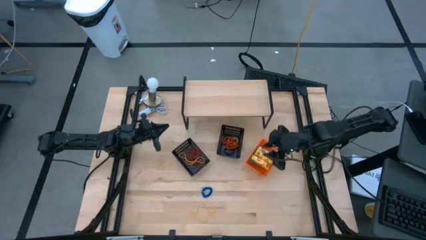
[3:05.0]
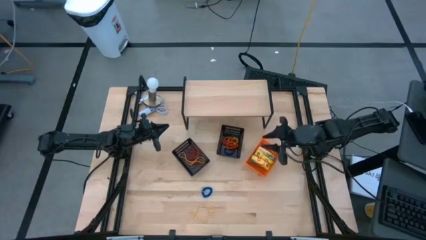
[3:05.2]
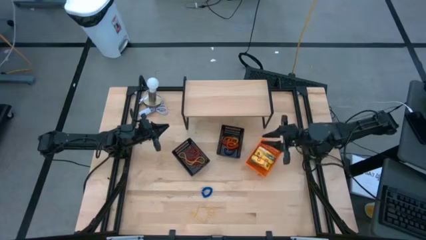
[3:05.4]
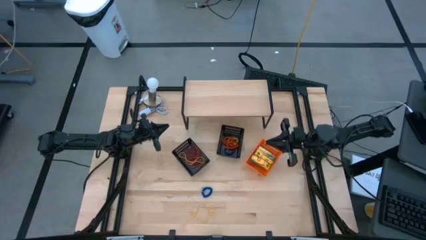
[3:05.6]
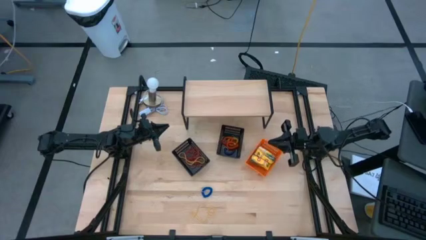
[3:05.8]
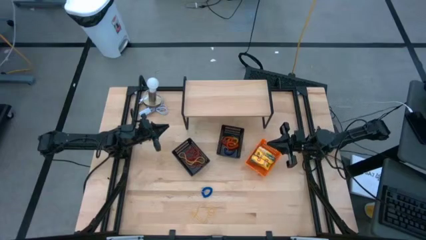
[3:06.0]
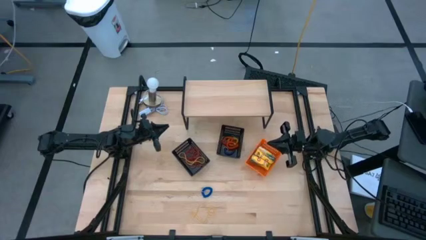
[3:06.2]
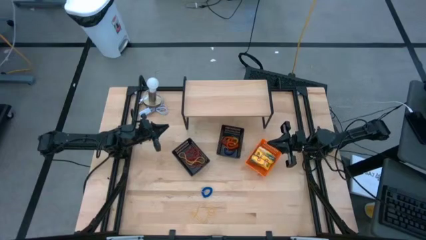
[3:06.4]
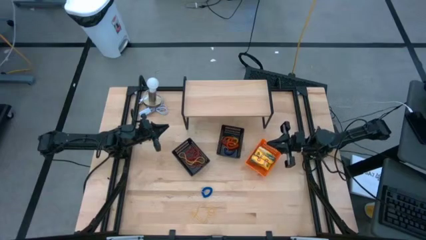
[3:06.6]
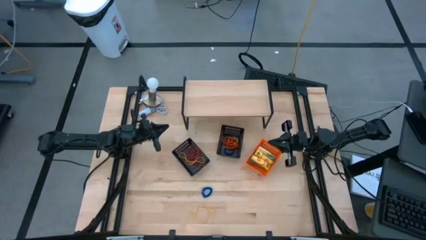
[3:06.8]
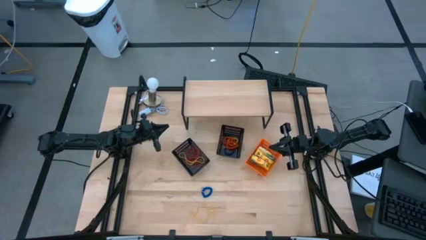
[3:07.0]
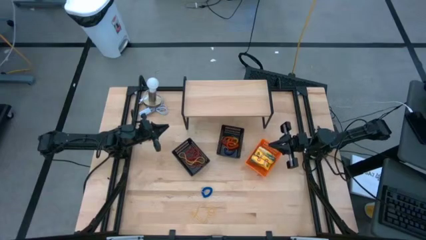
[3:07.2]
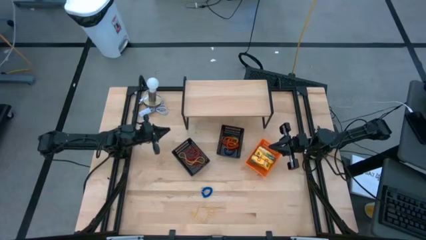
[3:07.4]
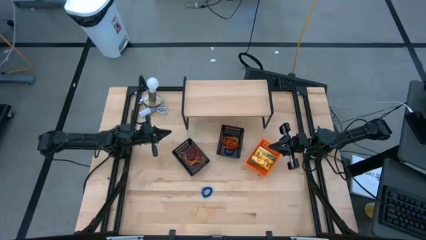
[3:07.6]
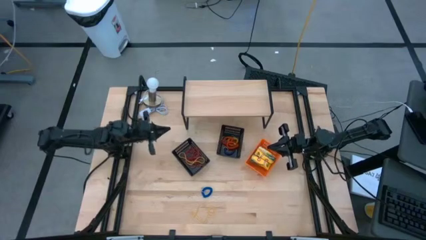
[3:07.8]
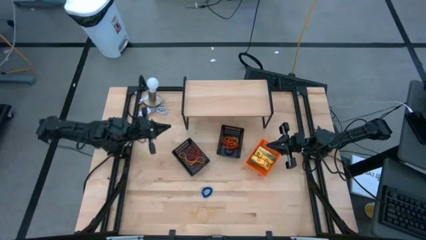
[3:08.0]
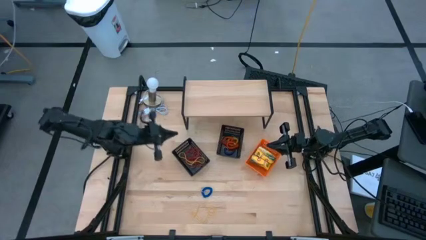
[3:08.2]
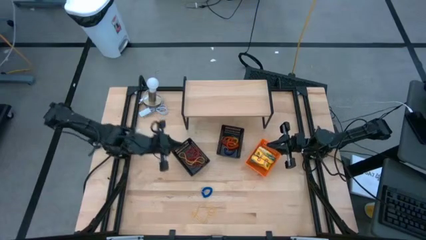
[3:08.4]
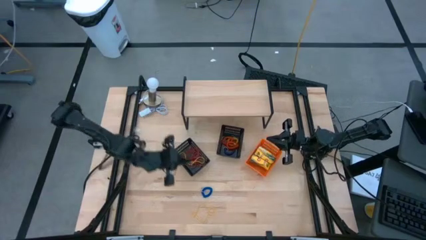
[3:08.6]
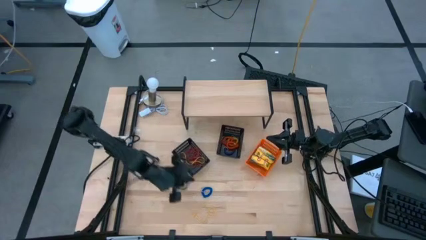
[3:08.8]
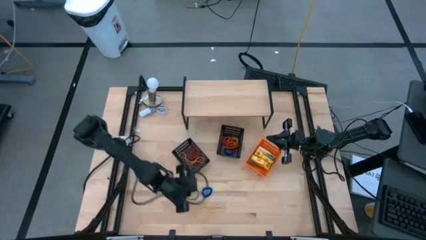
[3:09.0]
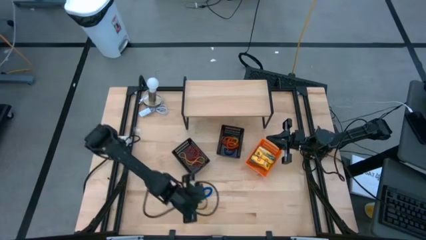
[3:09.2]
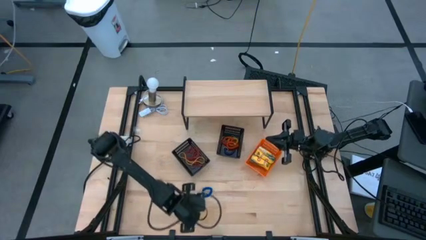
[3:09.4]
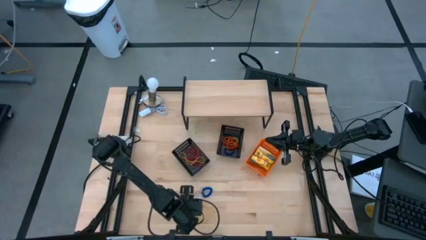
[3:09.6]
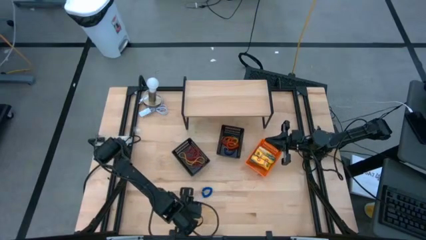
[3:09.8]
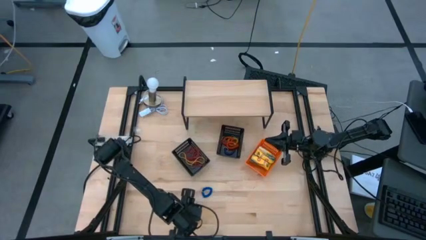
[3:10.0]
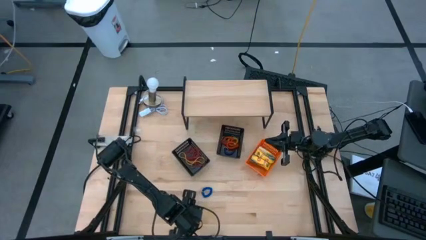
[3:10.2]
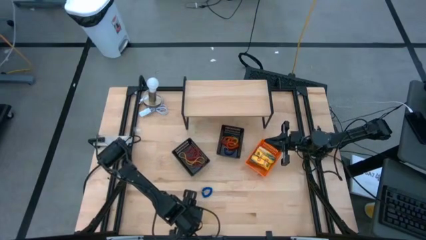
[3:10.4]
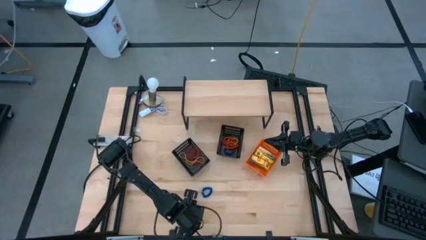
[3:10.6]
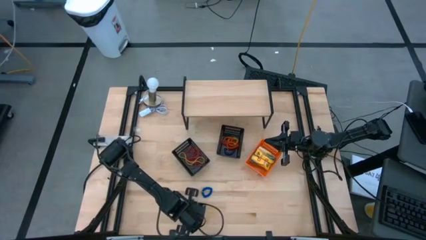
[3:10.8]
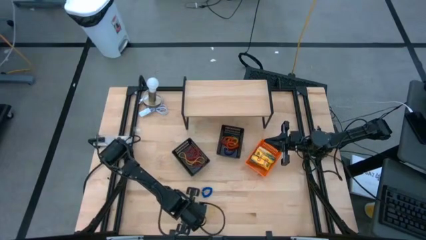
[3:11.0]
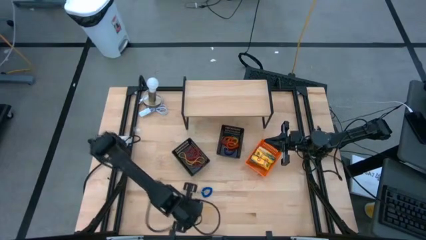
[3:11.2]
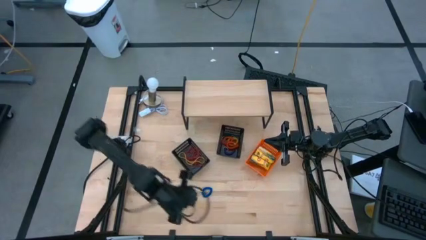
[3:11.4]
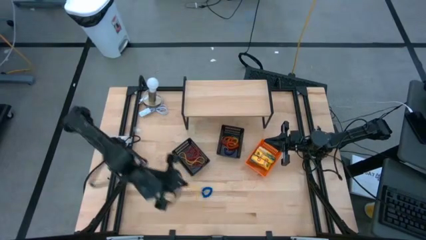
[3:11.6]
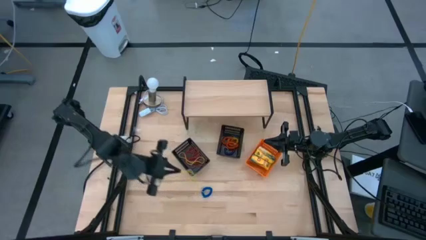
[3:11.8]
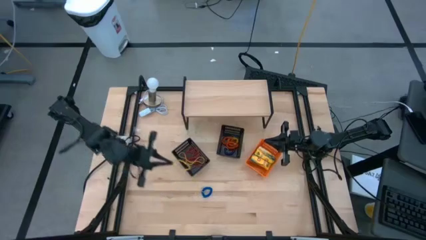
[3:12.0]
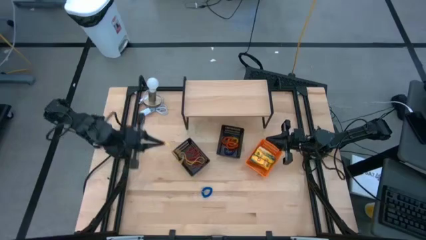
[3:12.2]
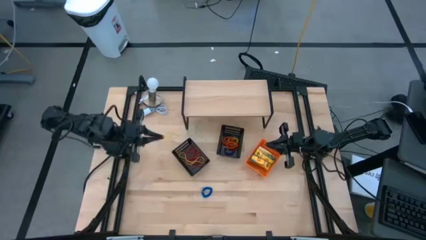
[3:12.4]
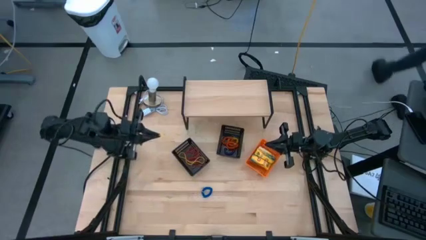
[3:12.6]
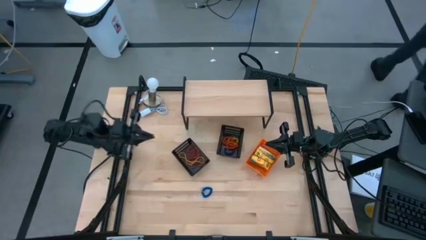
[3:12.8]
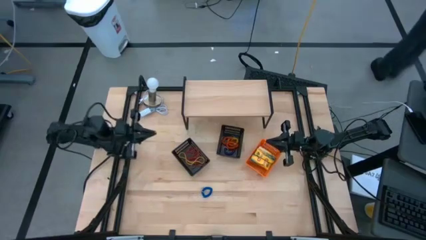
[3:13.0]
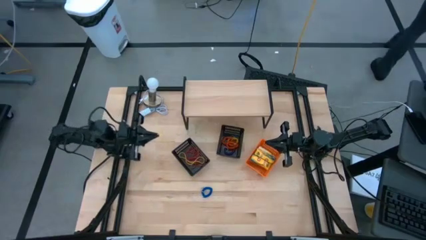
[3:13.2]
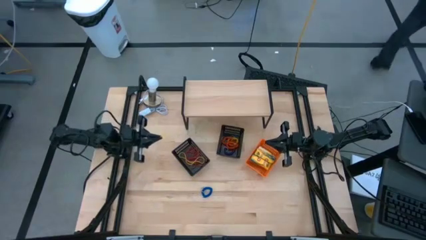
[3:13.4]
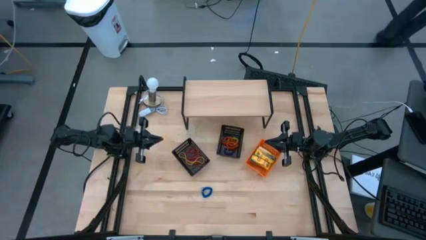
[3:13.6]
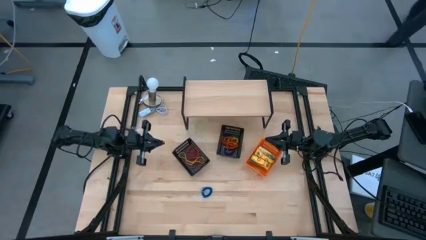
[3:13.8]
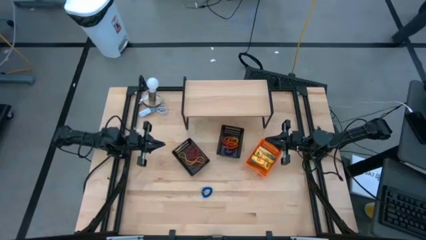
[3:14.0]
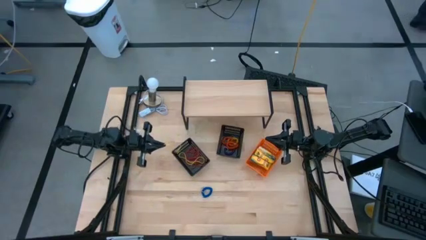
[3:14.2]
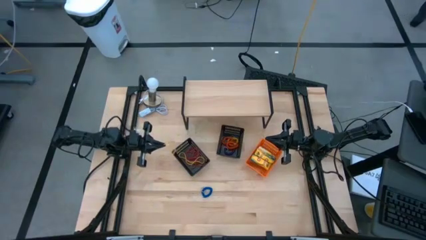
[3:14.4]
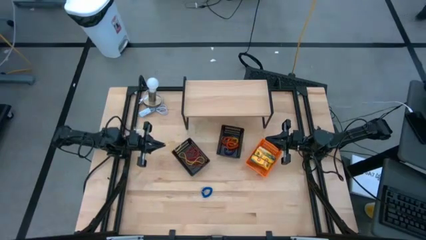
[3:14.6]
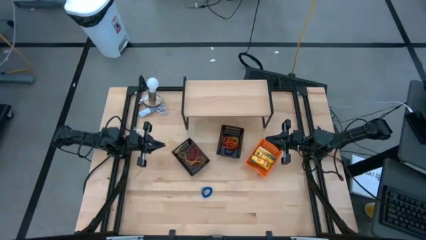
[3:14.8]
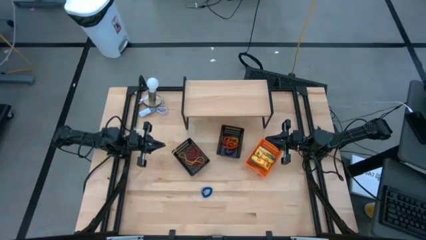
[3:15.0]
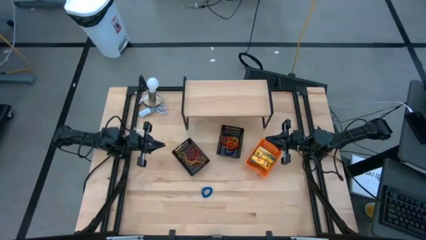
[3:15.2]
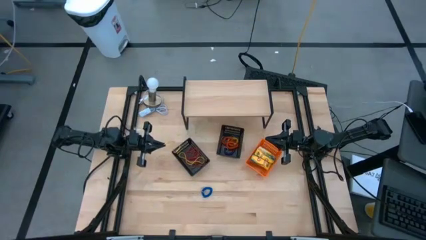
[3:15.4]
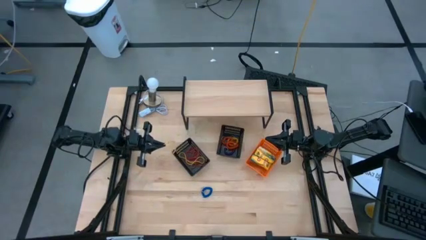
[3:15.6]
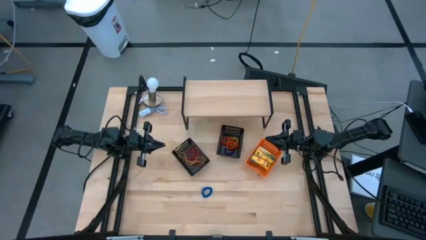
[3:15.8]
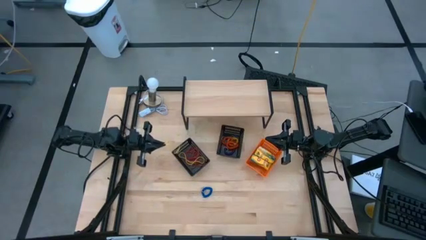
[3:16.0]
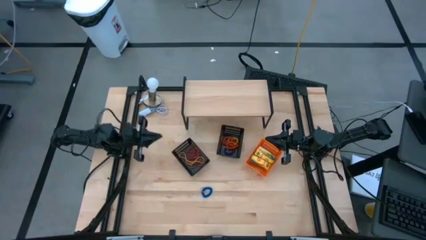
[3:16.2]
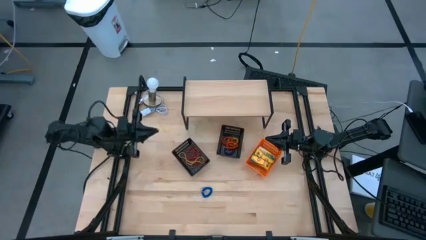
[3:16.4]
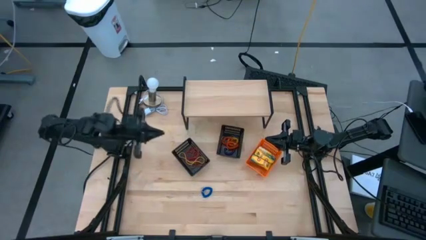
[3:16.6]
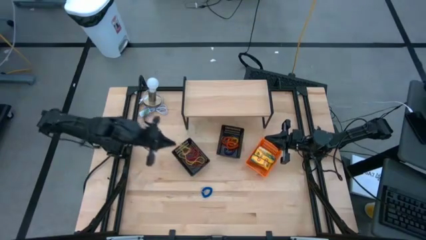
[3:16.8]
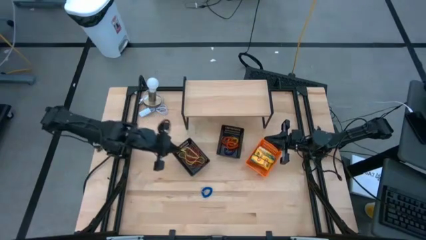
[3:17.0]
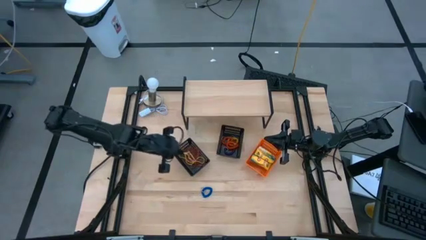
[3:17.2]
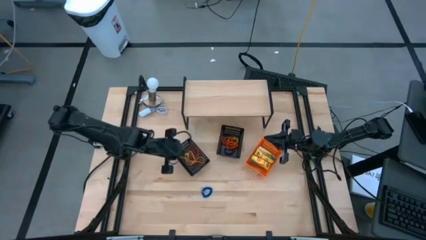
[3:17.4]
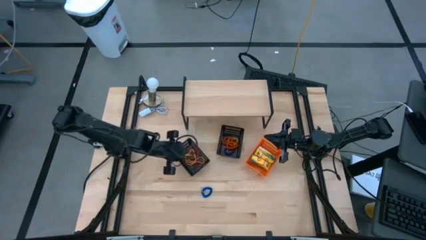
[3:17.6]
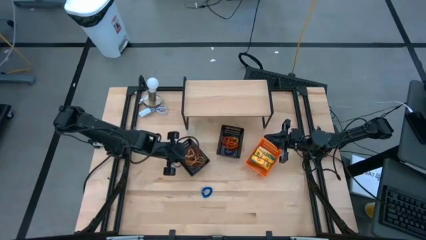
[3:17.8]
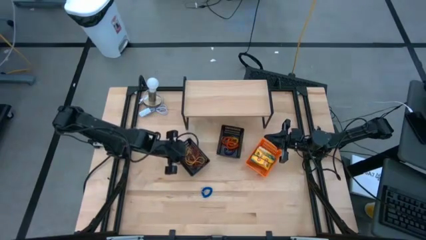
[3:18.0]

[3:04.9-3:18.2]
Task: Pick & Place Office Desk Supplies
Put the yellow rubber band into the left black bin
